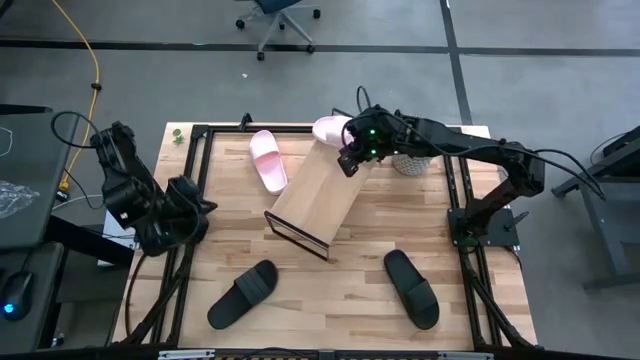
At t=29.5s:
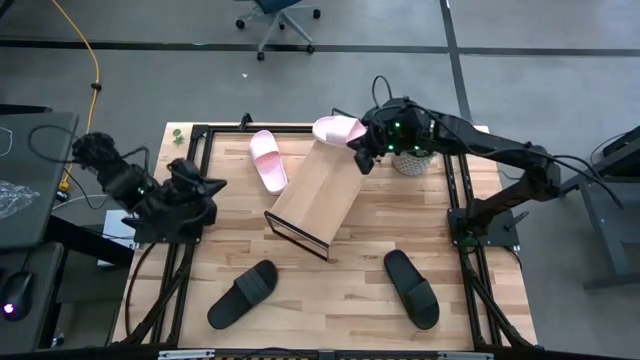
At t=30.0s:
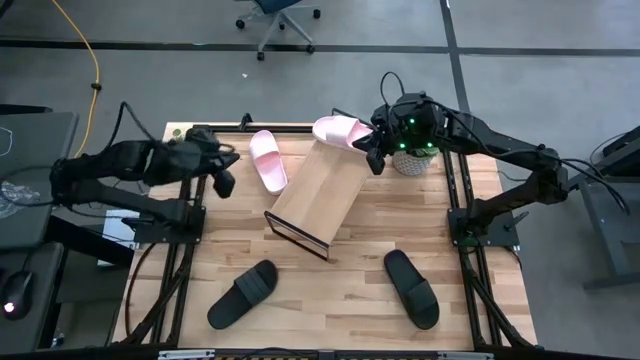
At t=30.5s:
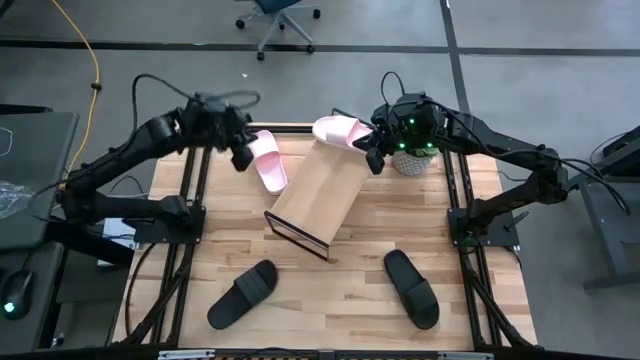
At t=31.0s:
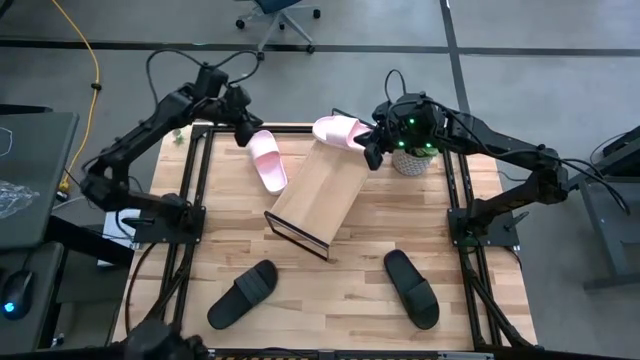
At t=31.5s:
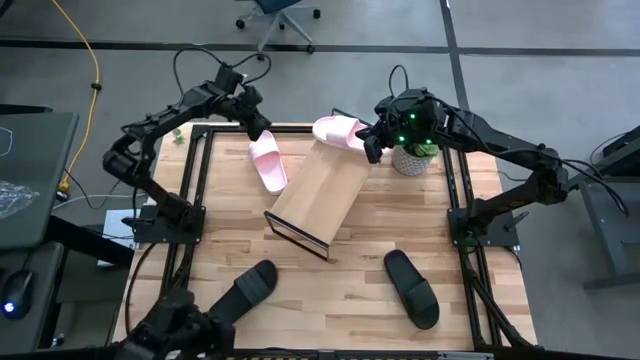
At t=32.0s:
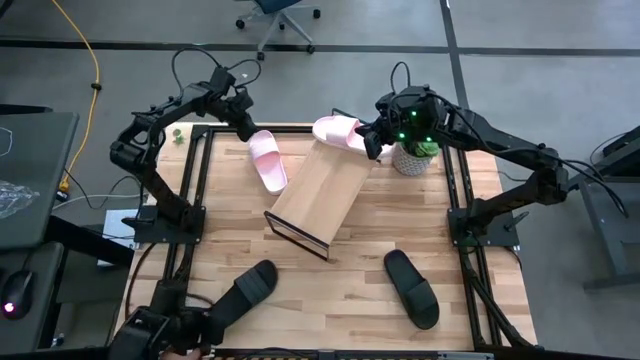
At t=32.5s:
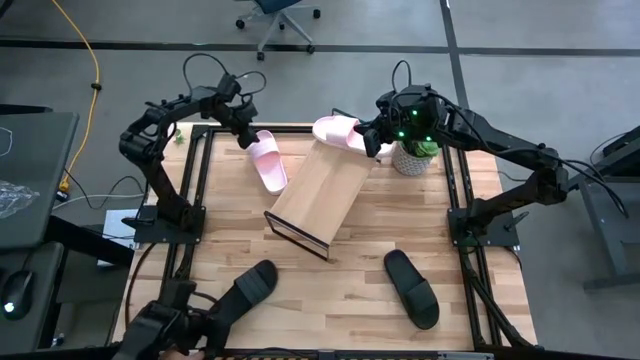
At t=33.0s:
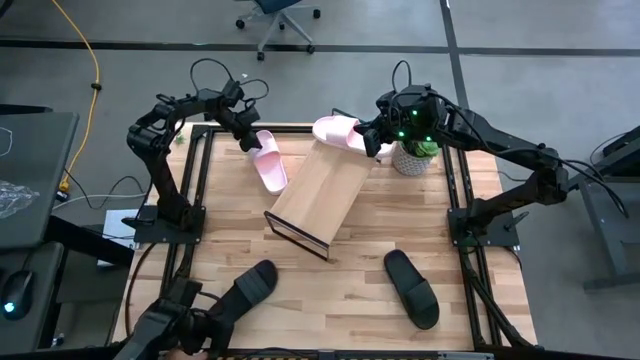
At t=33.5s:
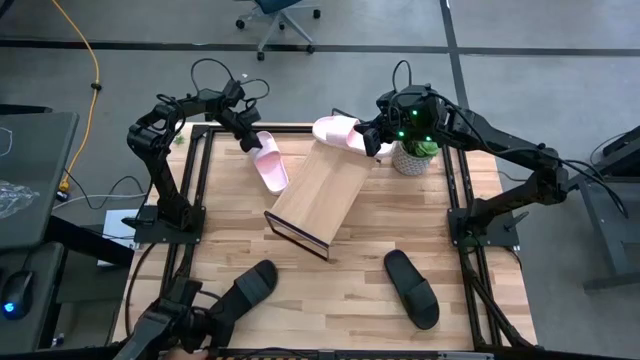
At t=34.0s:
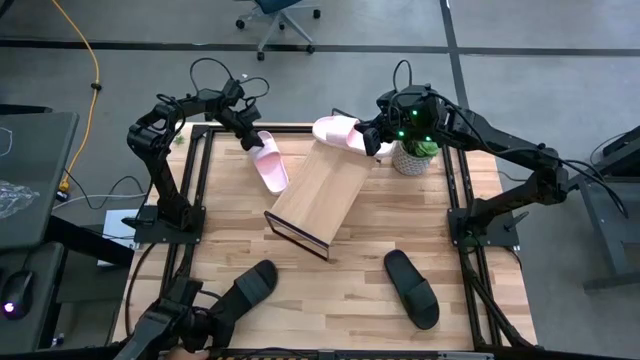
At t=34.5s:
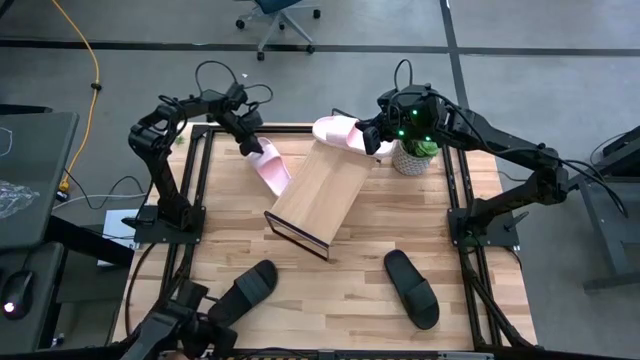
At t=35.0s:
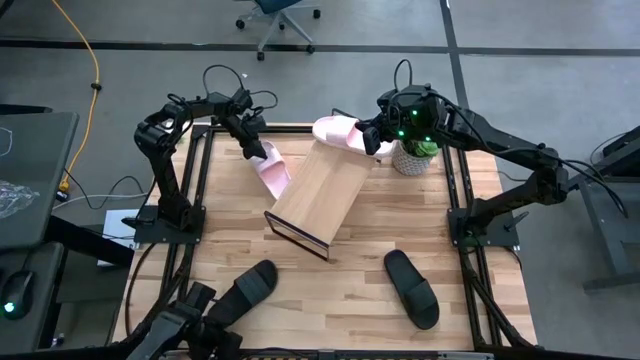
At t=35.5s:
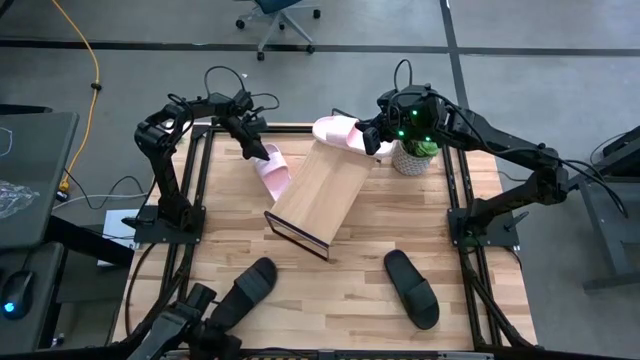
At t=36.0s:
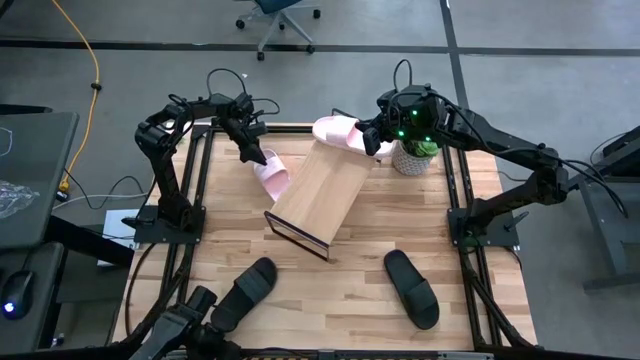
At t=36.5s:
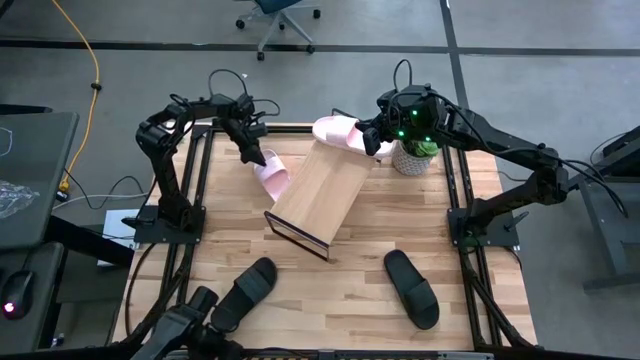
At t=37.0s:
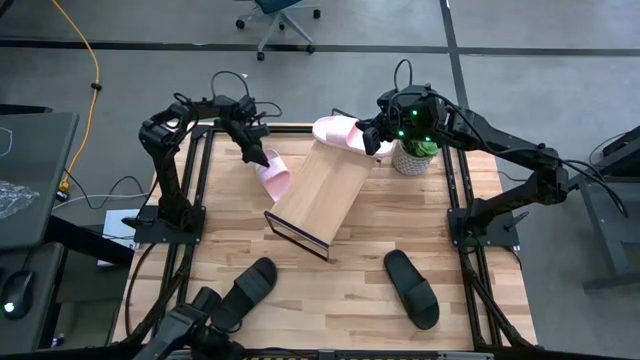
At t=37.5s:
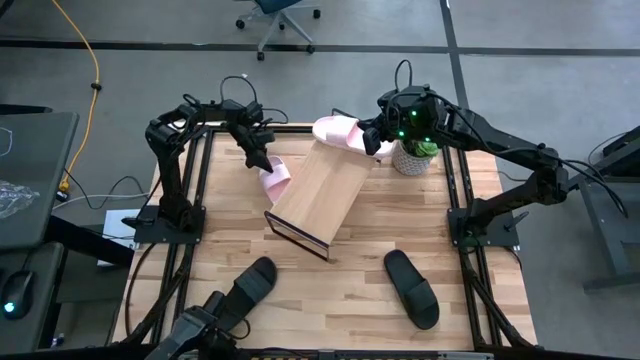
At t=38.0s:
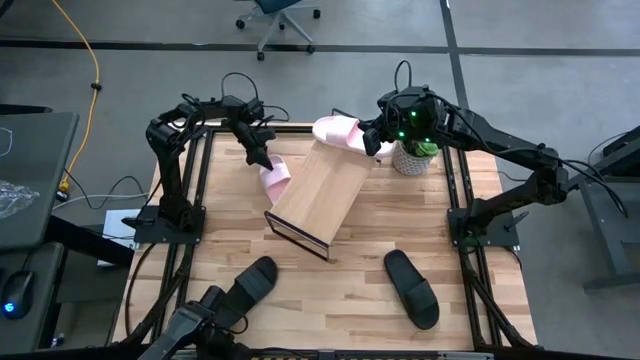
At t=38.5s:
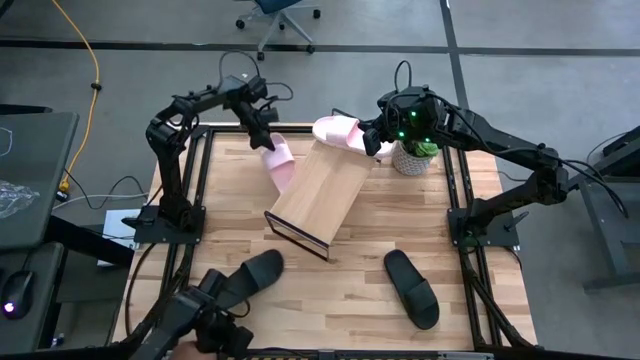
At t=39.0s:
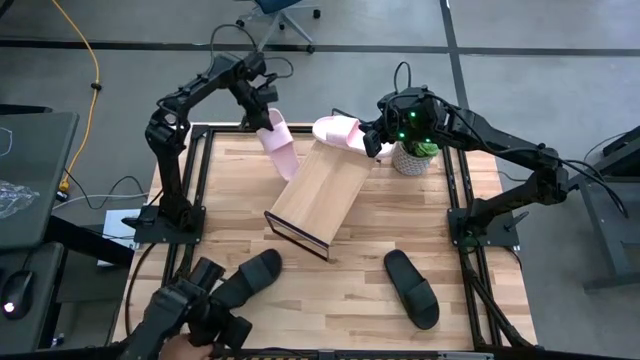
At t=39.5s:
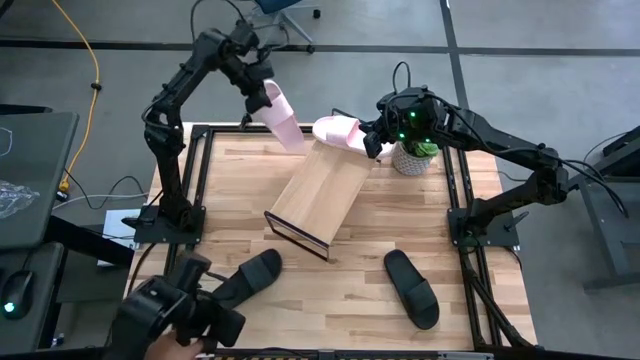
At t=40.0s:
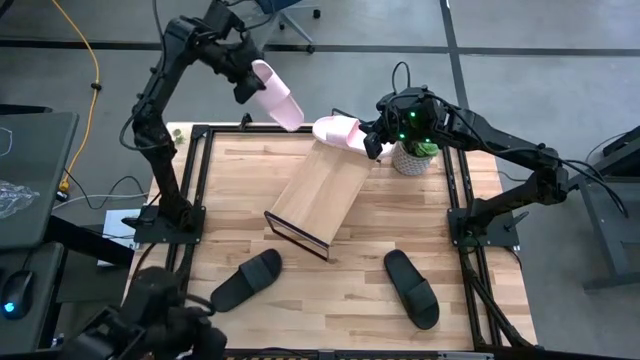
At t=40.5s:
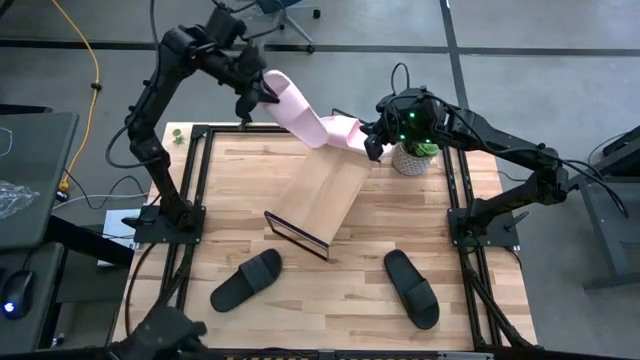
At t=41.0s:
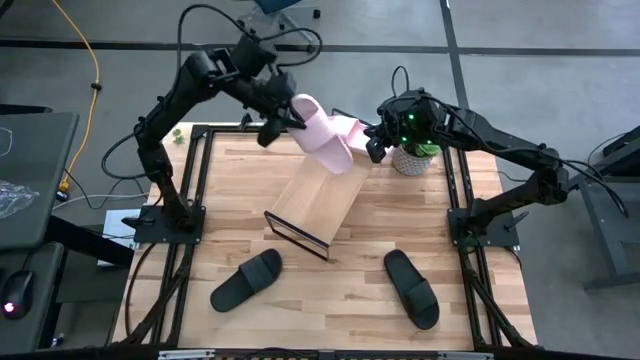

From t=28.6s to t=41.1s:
Task: Pick and place slides into the shelf
Put the pink slide on the shelf

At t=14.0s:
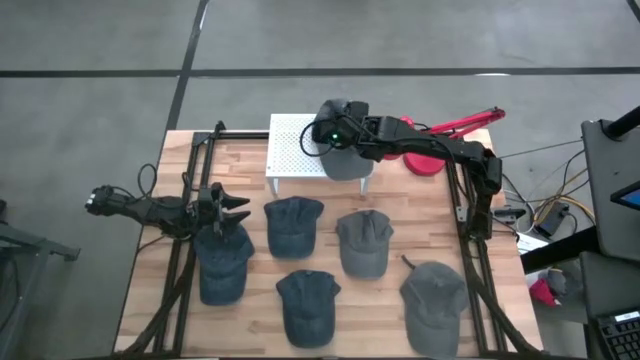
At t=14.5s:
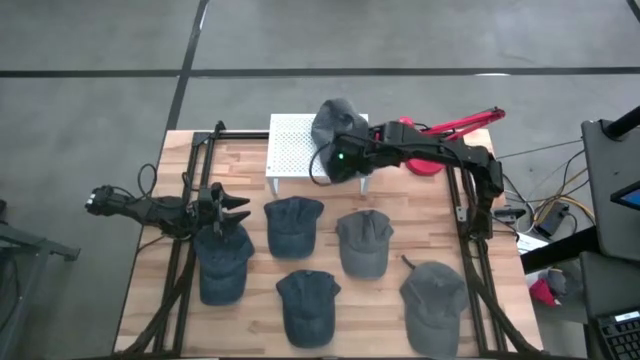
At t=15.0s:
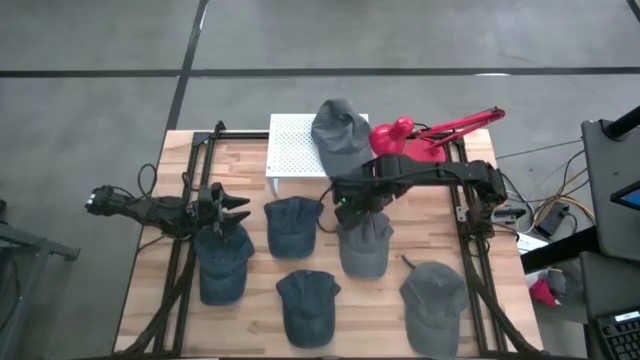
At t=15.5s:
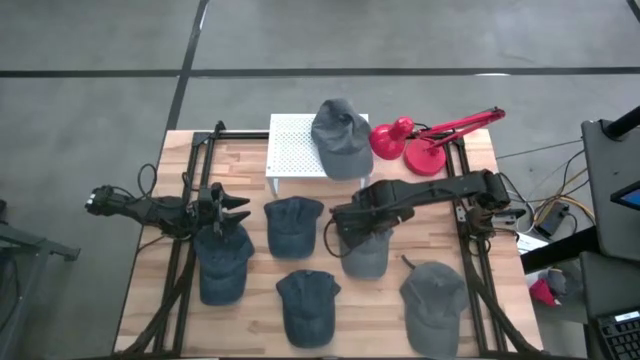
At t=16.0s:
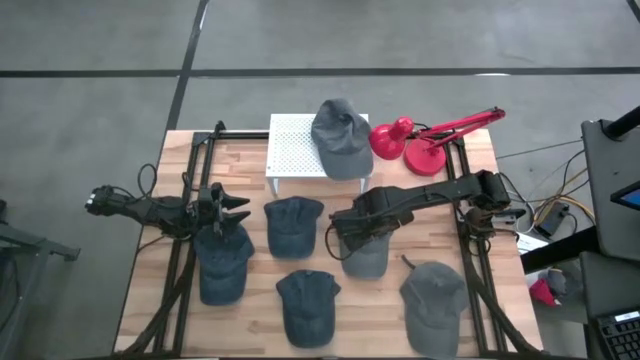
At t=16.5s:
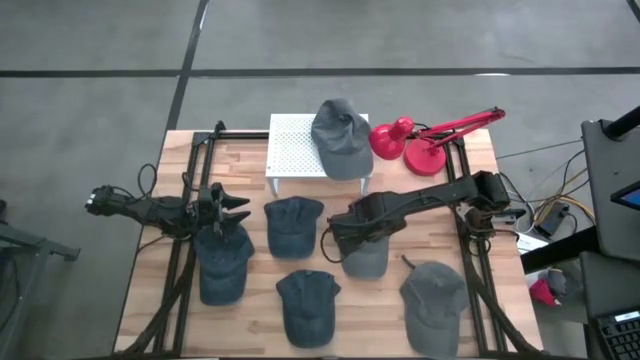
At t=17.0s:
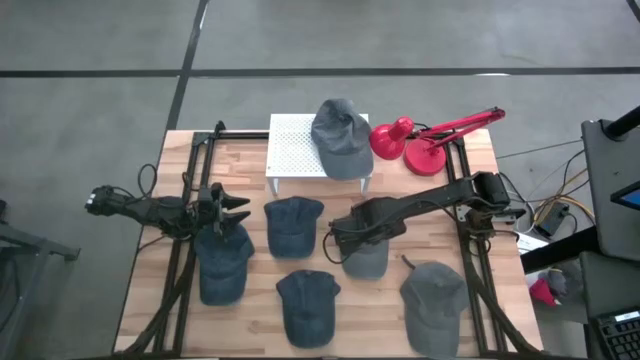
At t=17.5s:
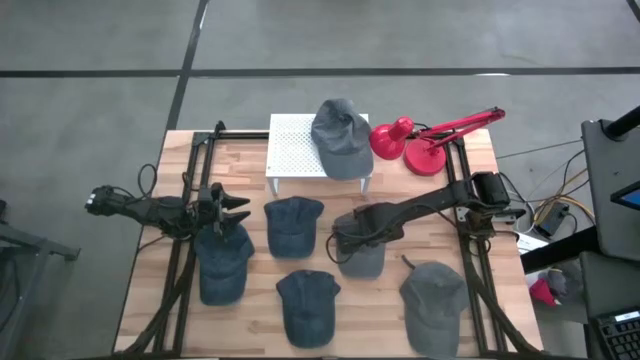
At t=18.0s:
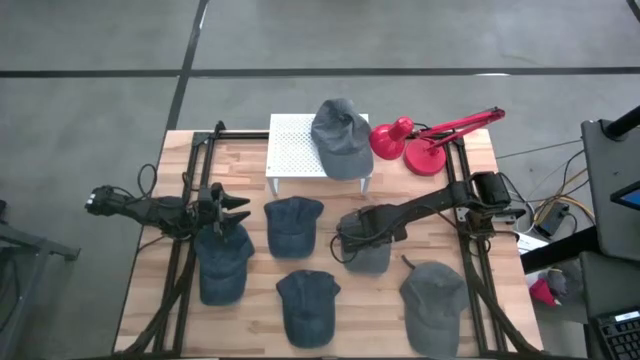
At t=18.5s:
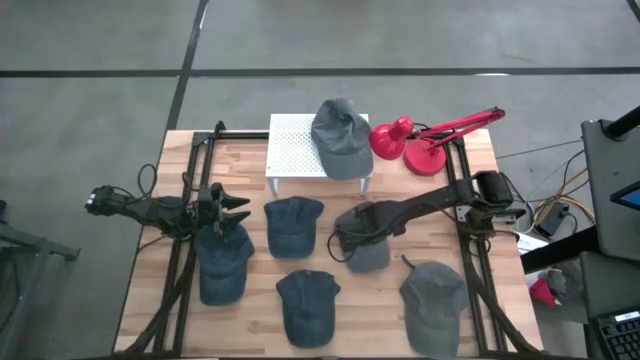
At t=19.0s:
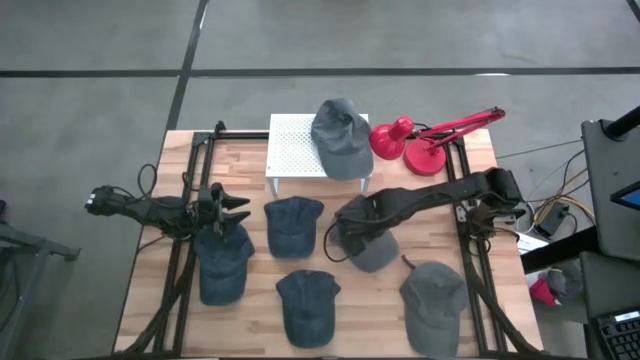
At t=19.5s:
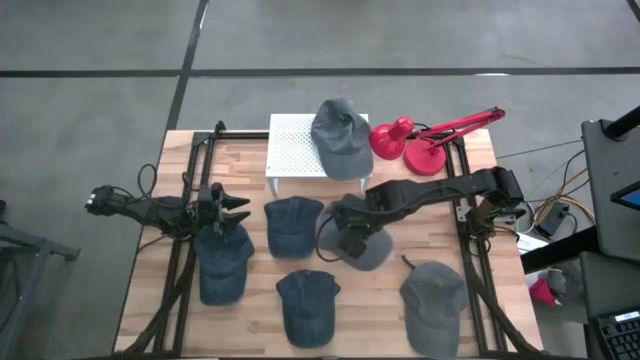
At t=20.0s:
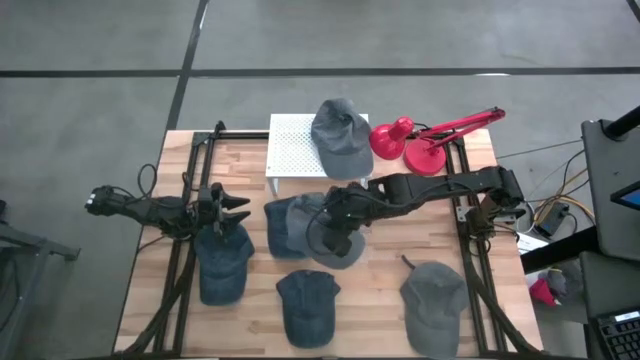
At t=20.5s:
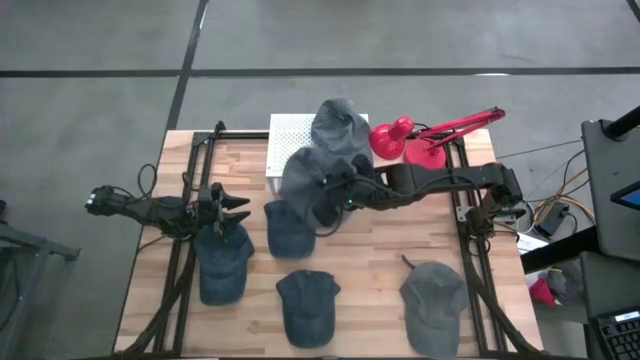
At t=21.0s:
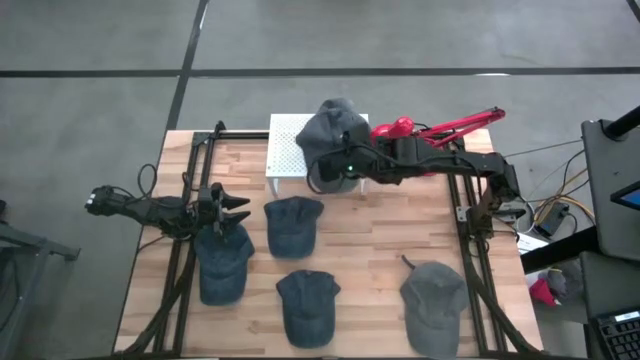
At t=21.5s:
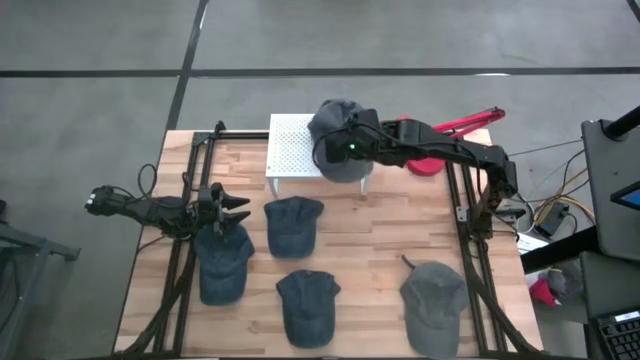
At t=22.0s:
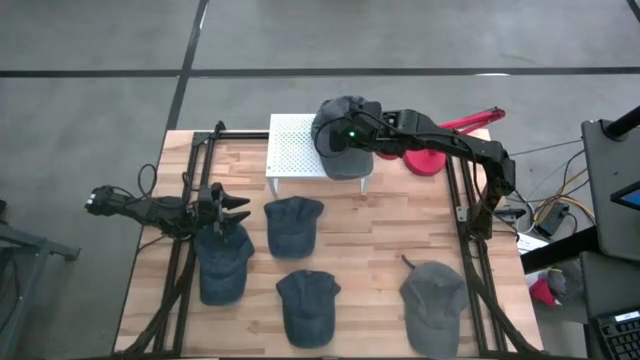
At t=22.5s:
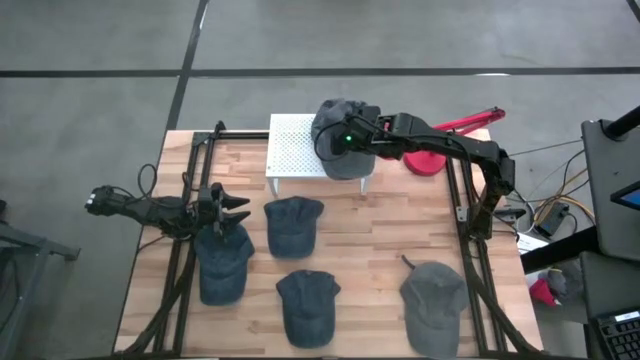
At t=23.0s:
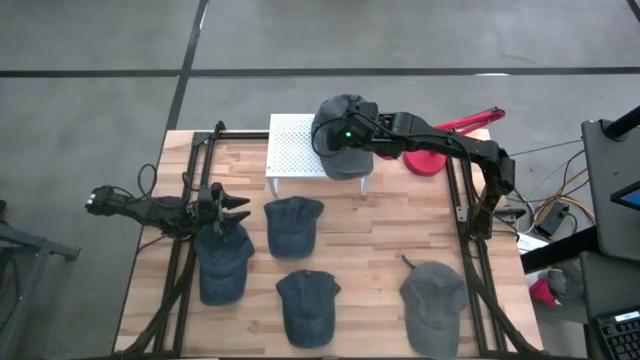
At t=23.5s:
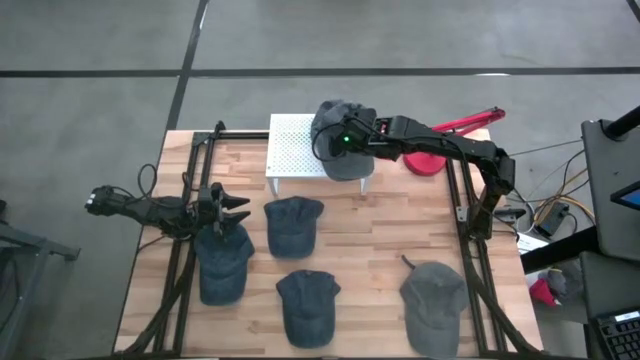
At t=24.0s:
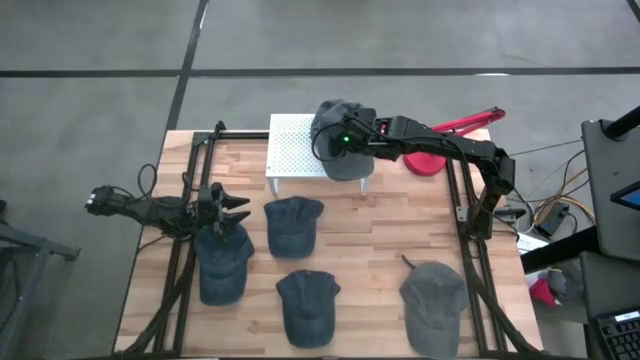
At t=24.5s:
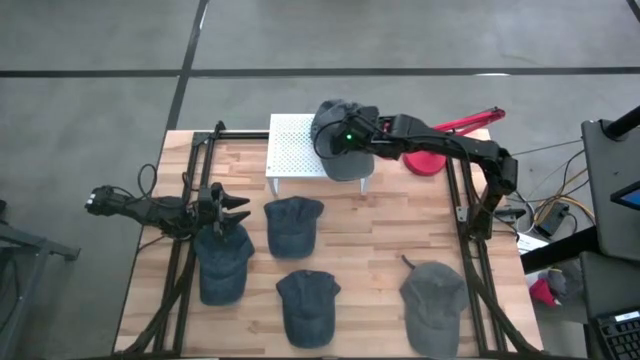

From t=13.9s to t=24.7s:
Task: Pick & Place hat
Stack the top gray cap on the gray cap on the shelf
